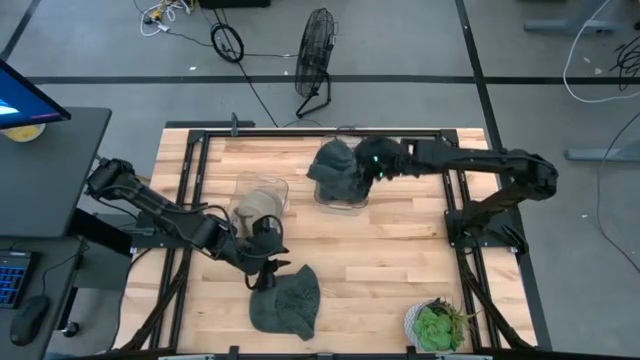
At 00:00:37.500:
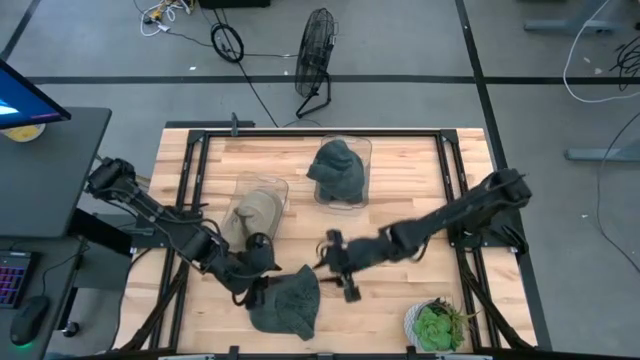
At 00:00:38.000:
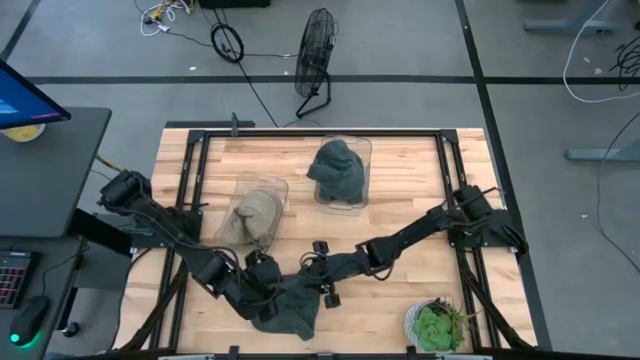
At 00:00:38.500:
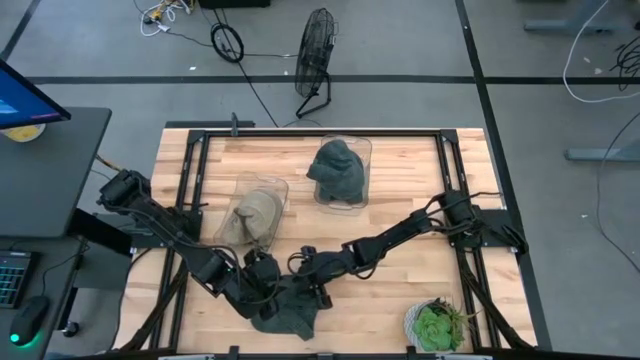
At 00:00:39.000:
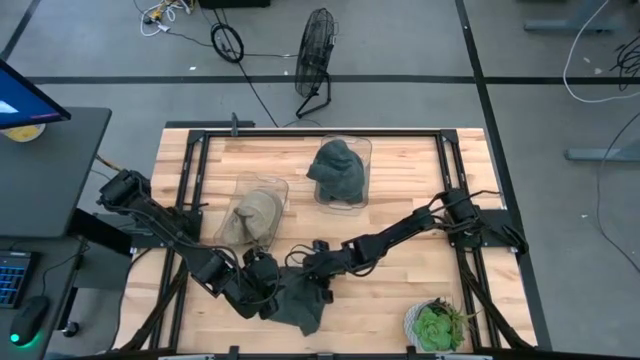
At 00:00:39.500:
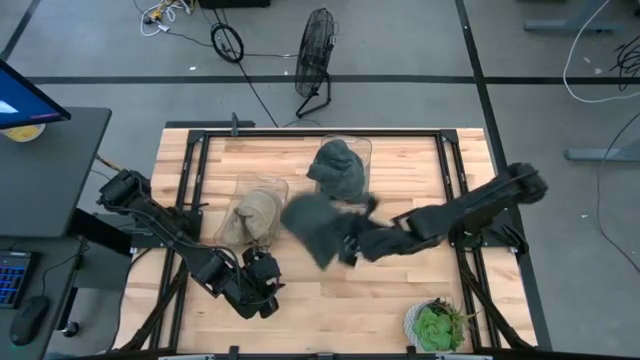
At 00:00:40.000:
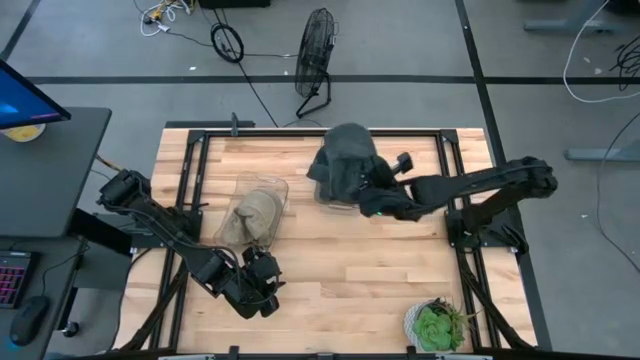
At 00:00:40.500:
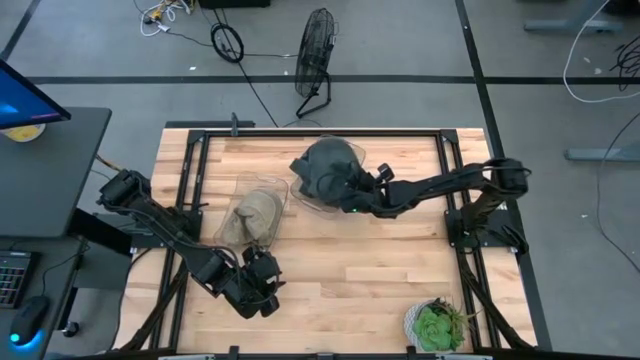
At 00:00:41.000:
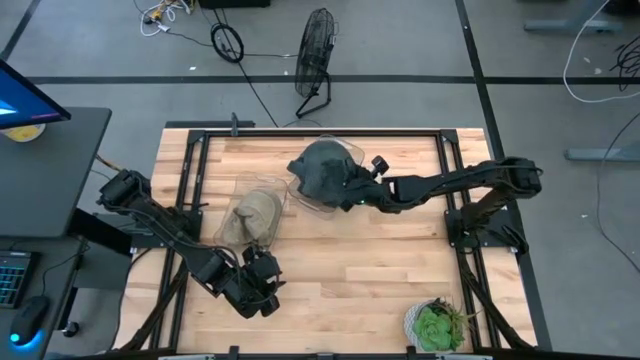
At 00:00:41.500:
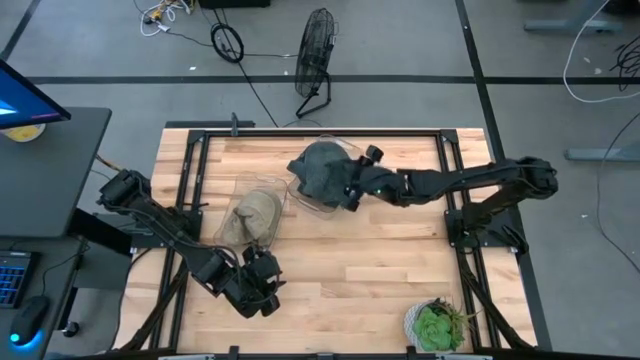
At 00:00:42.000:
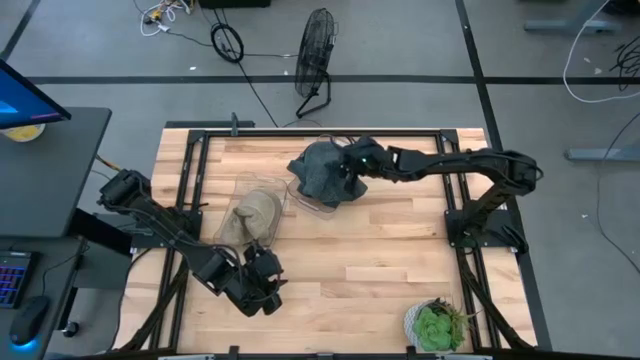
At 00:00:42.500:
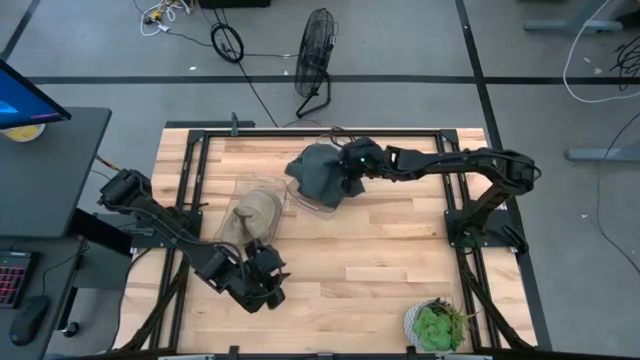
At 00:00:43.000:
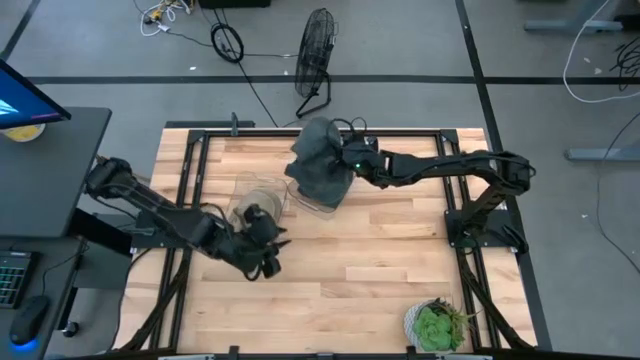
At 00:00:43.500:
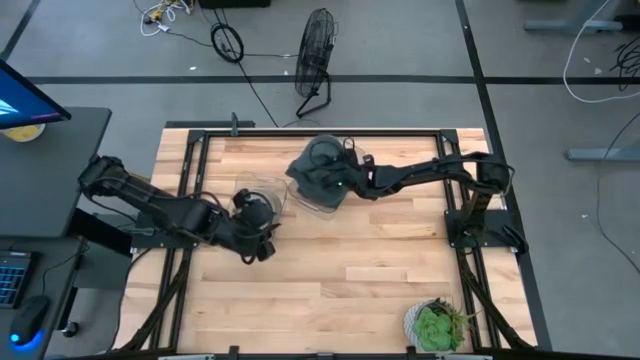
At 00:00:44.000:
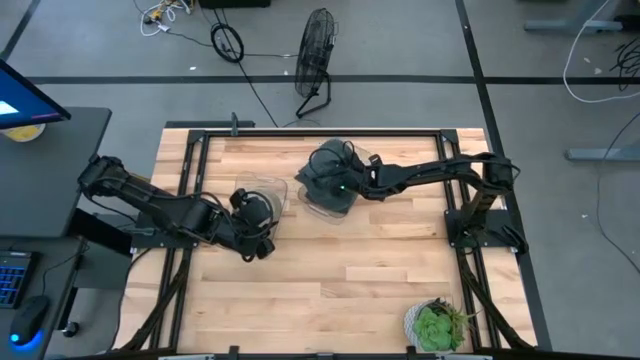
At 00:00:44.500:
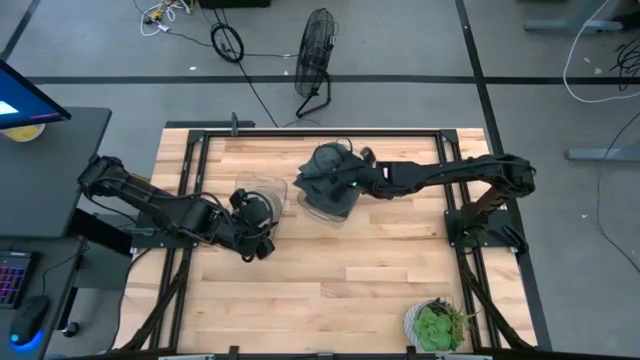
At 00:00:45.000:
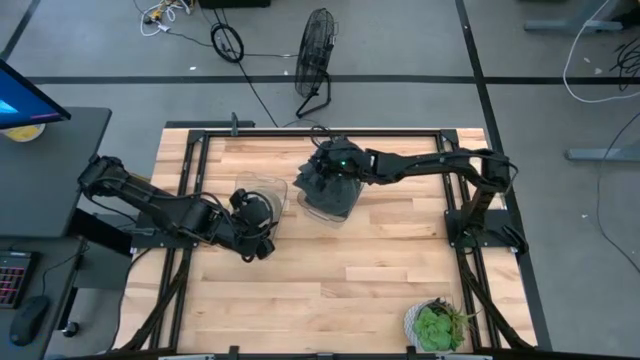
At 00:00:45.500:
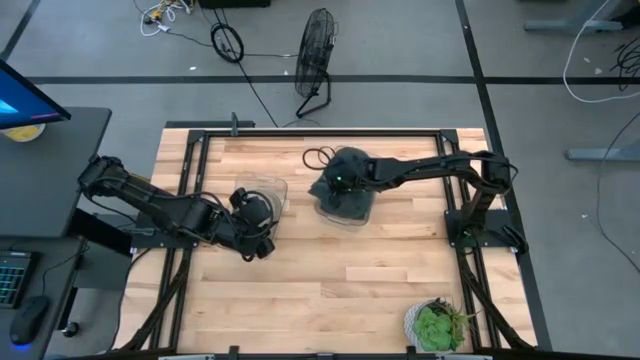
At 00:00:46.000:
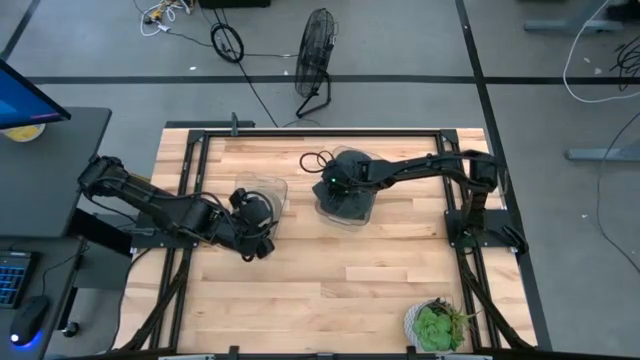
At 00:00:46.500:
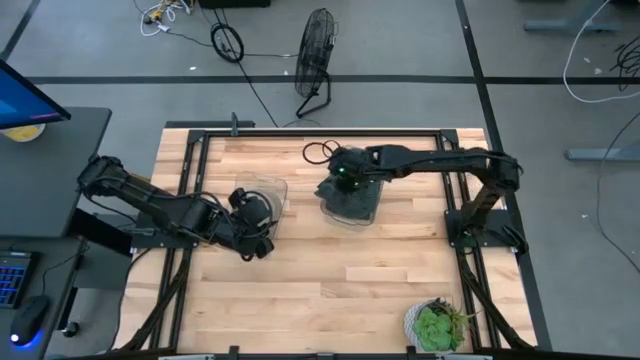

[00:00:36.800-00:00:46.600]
Task: Pick & Place hat
Put the blue cap into the right transparent bin

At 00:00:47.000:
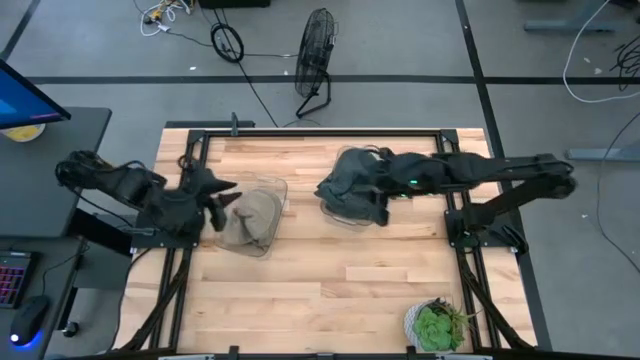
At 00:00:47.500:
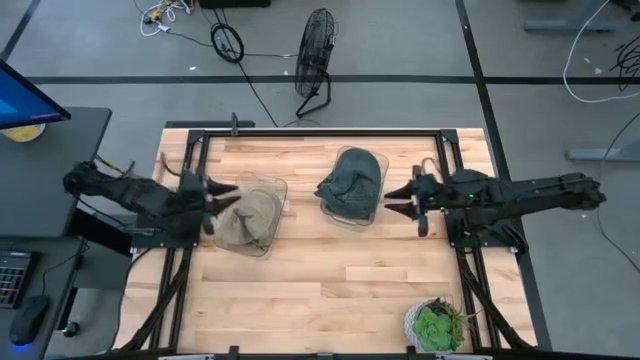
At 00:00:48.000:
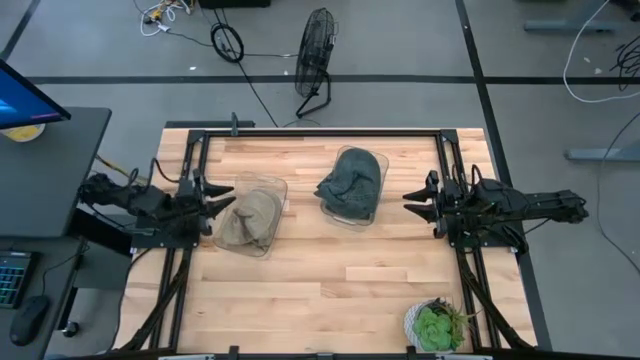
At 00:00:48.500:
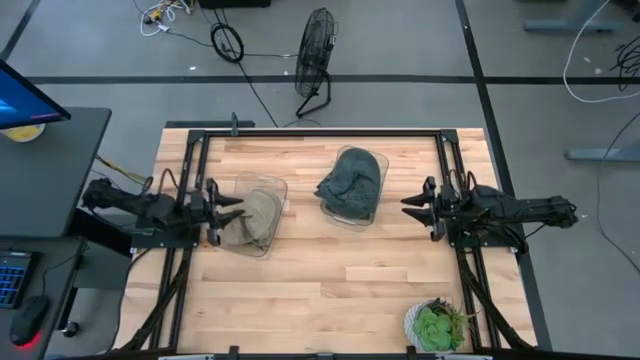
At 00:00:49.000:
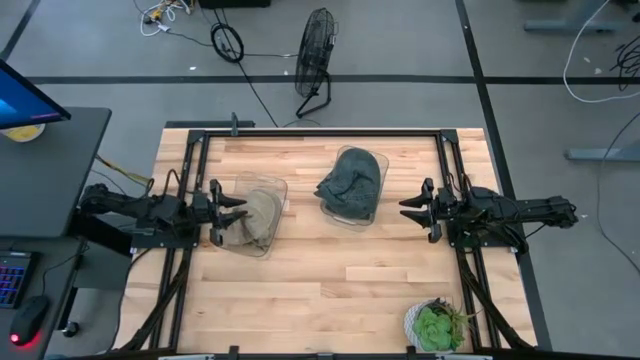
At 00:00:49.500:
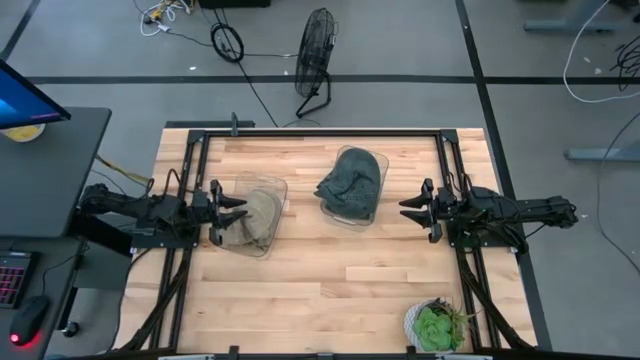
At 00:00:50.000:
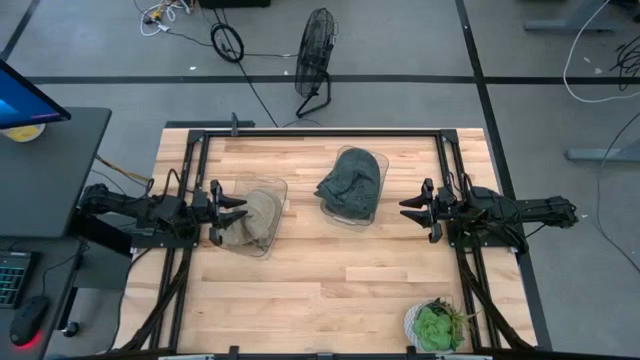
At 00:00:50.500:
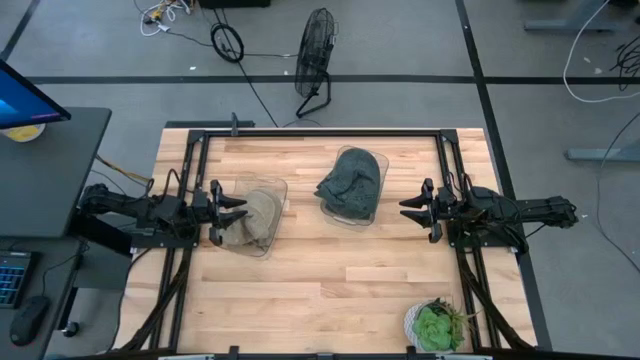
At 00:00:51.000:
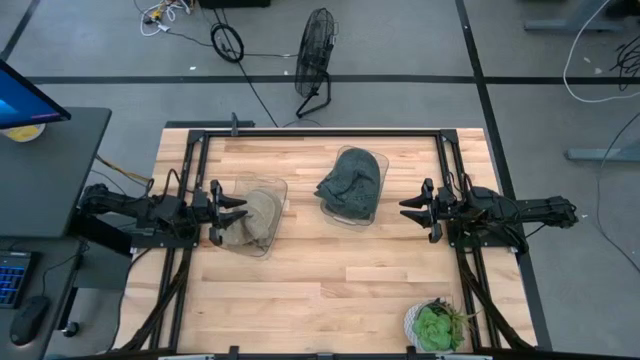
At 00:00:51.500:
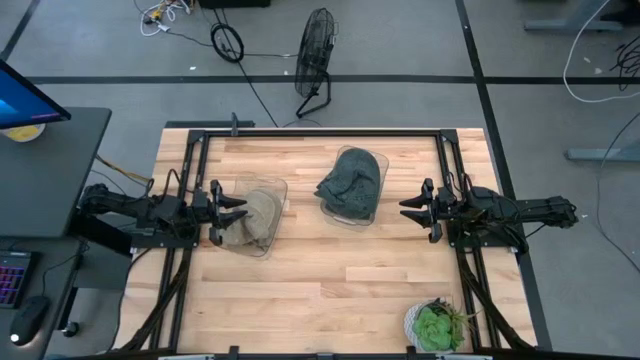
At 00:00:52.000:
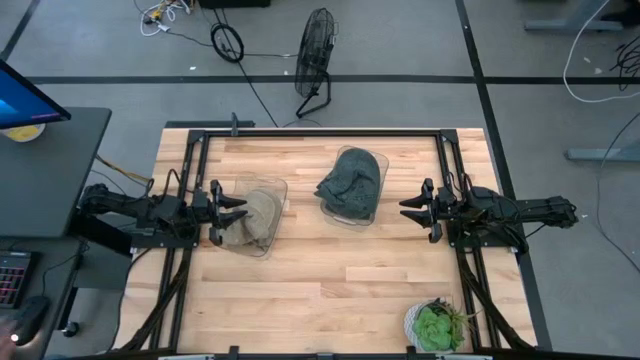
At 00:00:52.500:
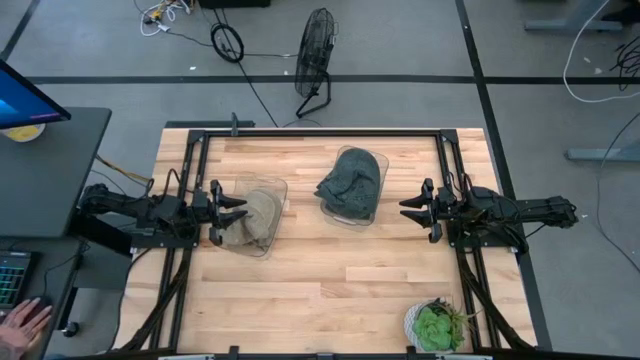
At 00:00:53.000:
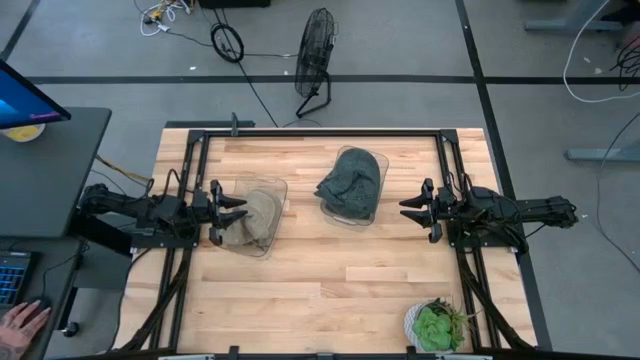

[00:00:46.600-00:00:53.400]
Return to Home Position

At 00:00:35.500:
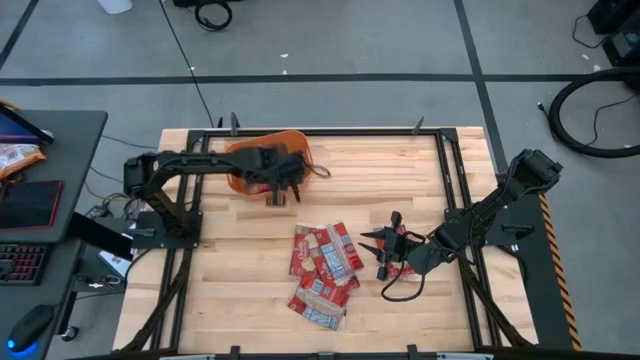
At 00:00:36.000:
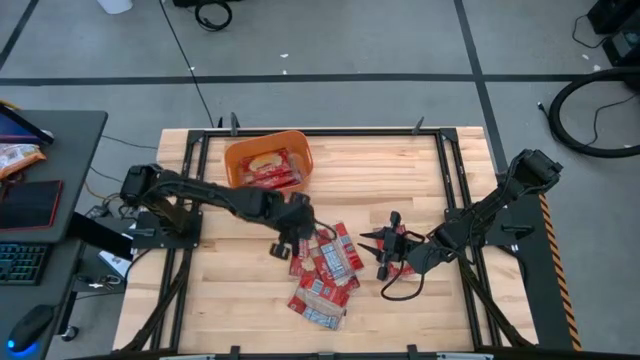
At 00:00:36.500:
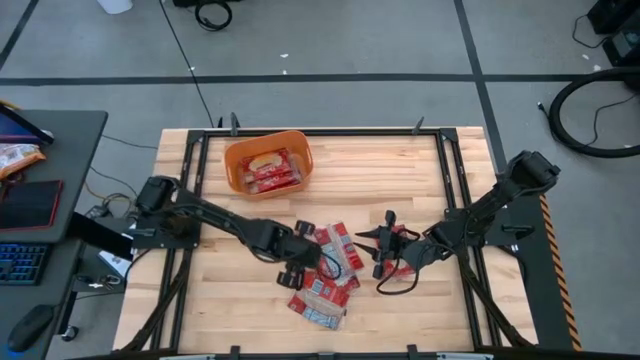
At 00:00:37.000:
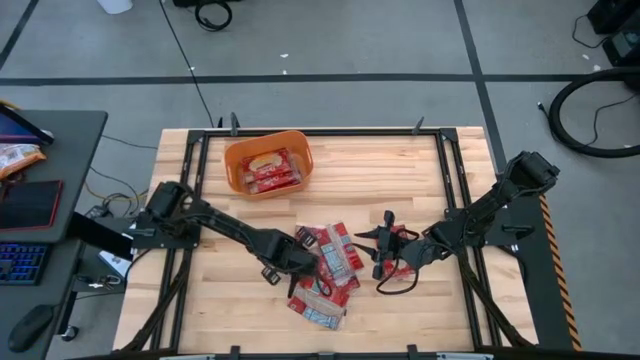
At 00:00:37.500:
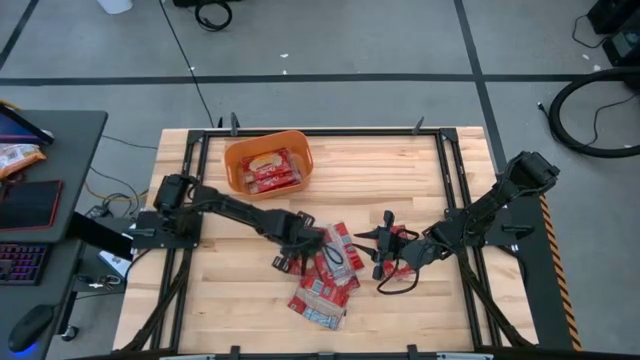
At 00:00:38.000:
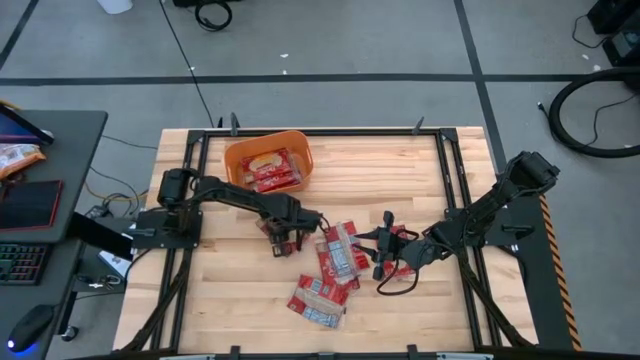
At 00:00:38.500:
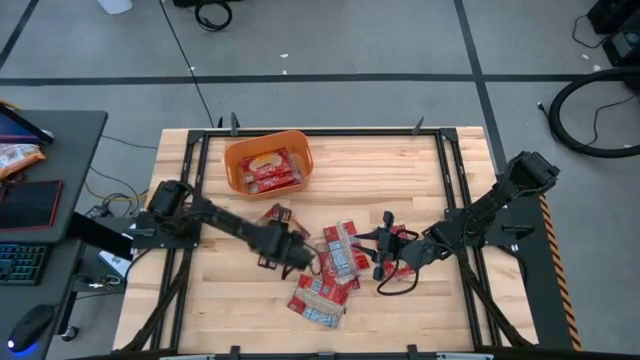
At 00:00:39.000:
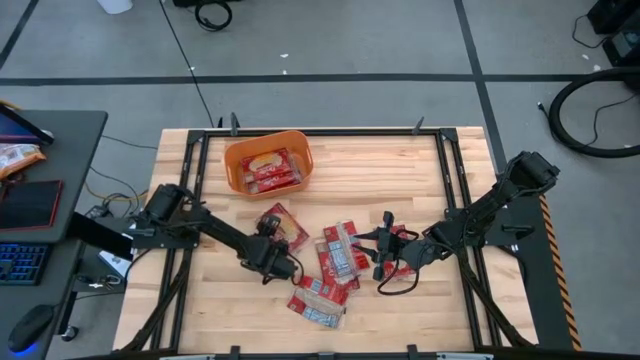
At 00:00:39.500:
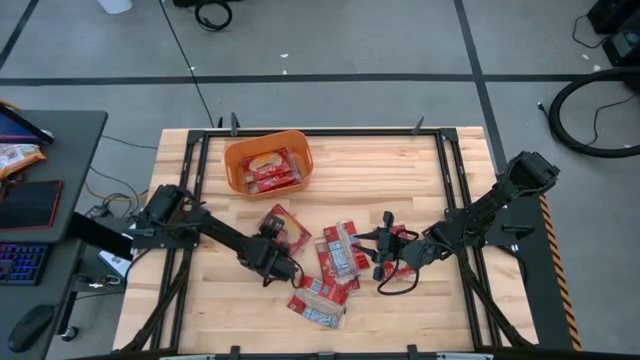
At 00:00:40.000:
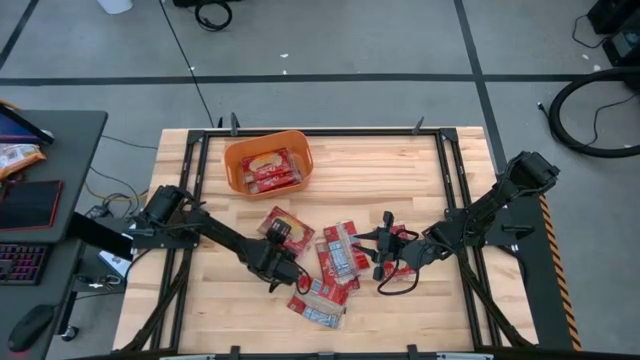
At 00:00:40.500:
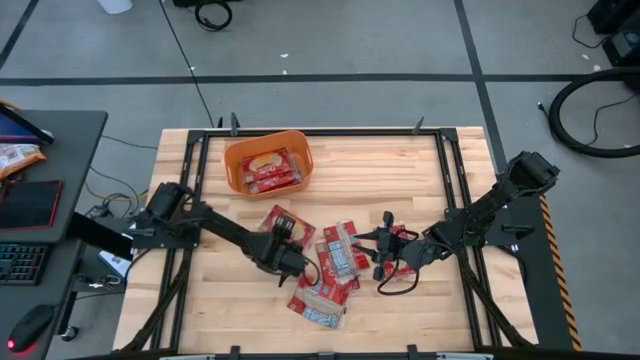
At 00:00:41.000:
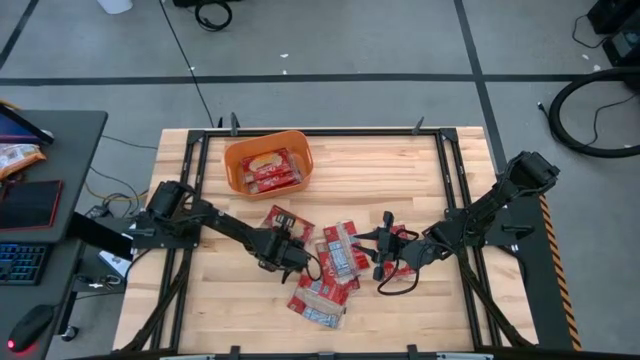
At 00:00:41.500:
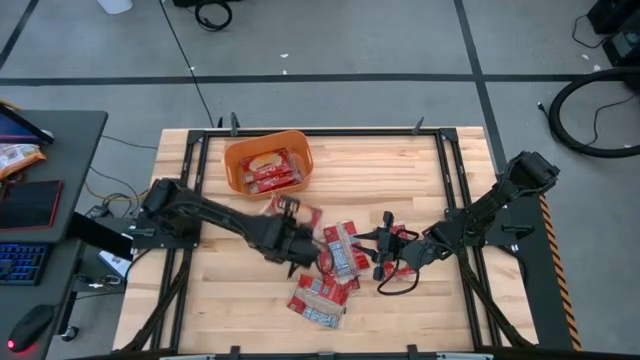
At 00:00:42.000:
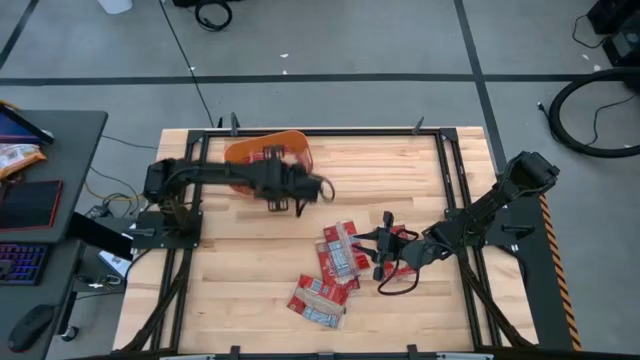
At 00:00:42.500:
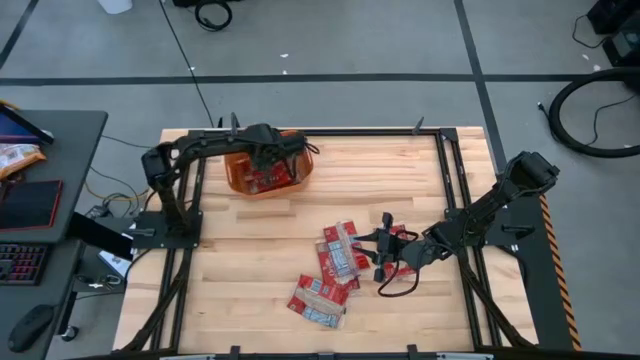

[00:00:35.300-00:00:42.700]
Task: Sort popcorn bags into baskets
Put the red popcorn bag into the orange bin
